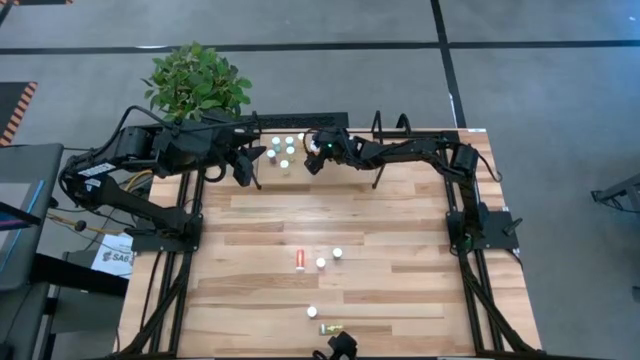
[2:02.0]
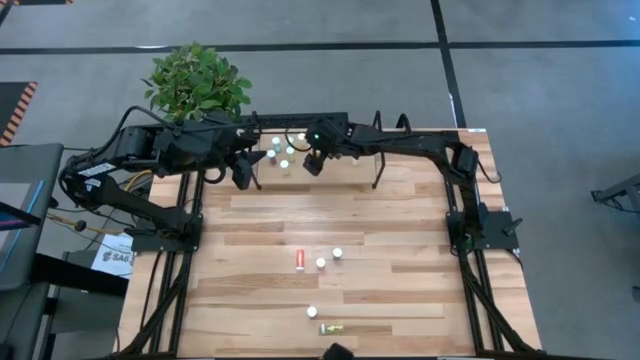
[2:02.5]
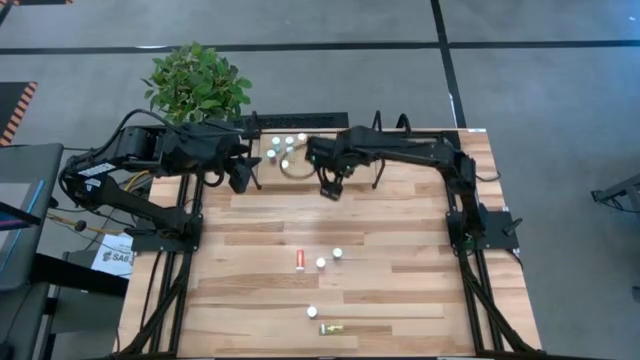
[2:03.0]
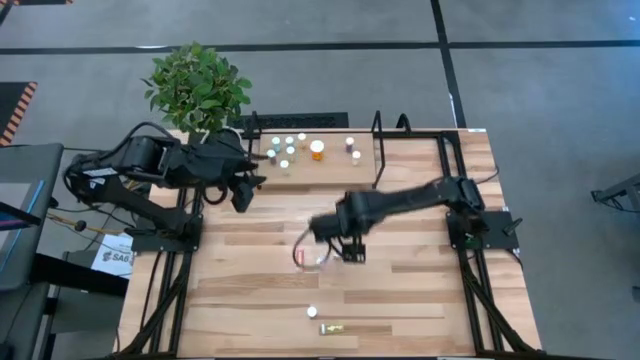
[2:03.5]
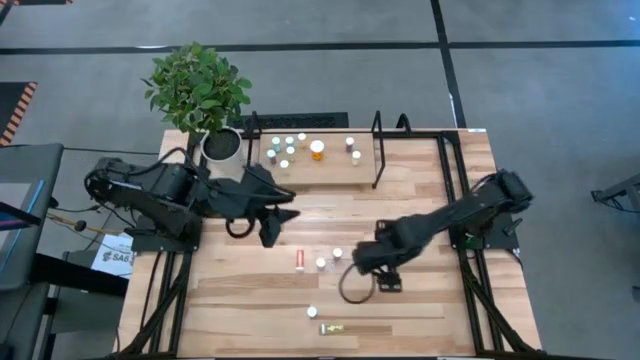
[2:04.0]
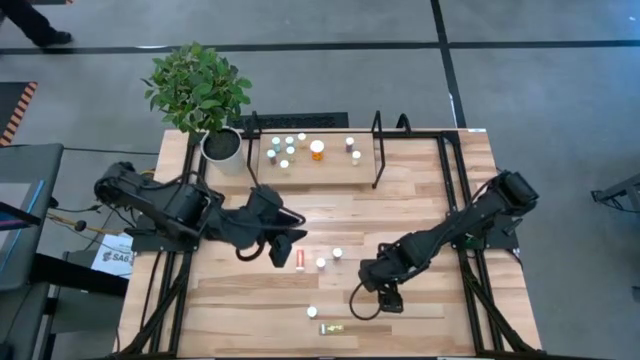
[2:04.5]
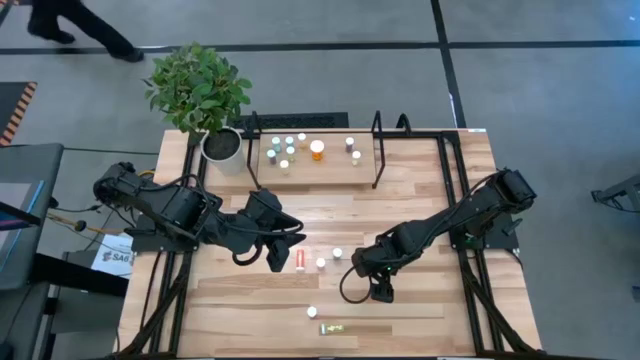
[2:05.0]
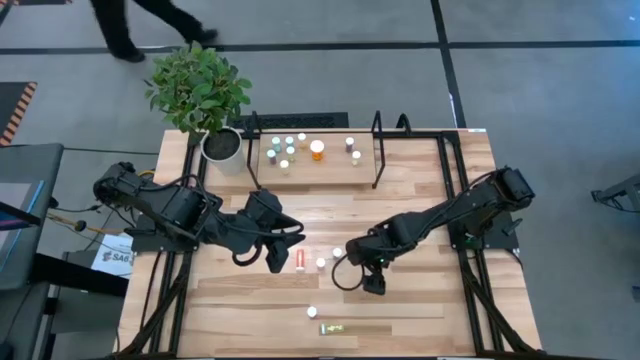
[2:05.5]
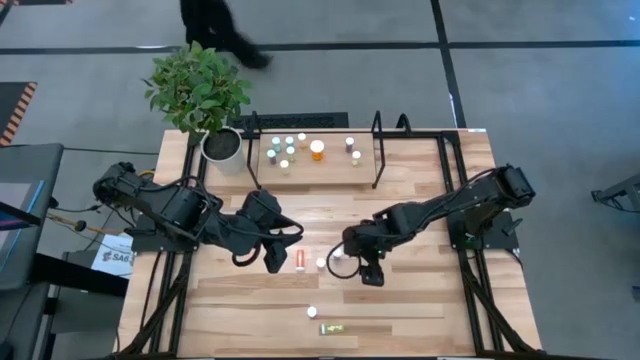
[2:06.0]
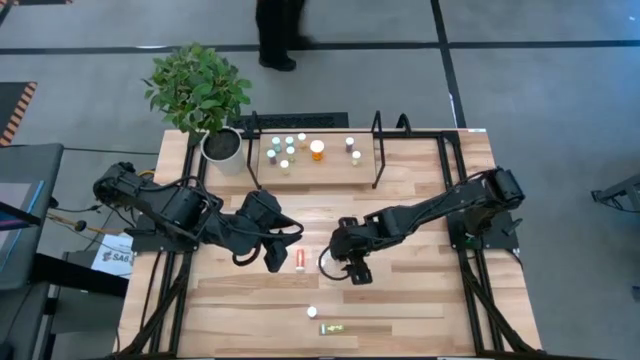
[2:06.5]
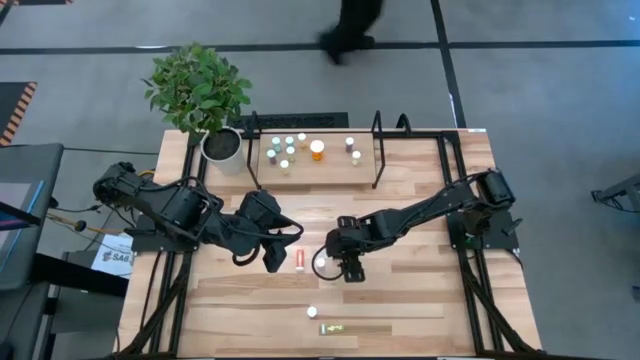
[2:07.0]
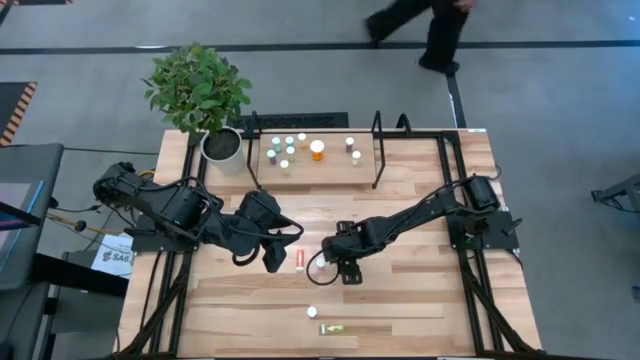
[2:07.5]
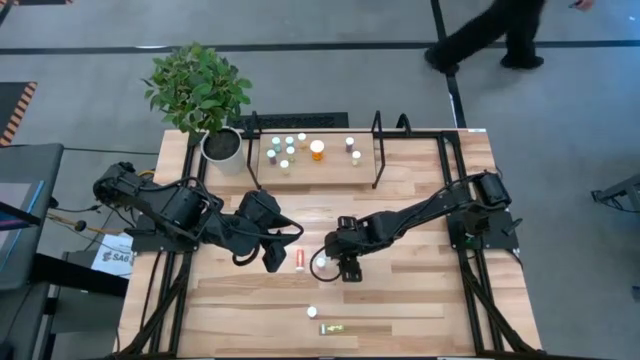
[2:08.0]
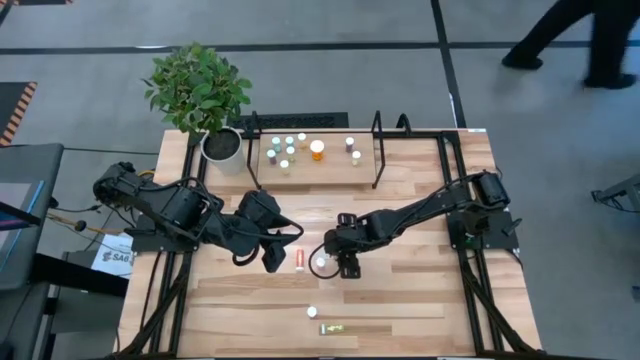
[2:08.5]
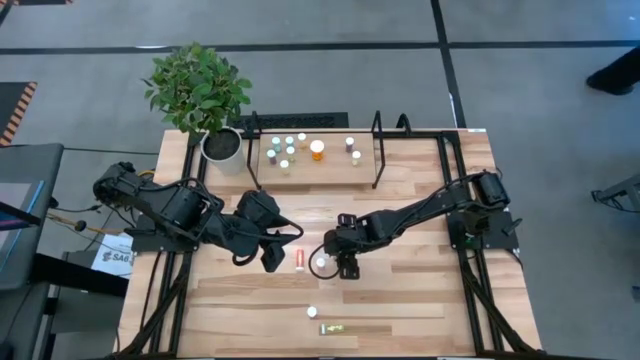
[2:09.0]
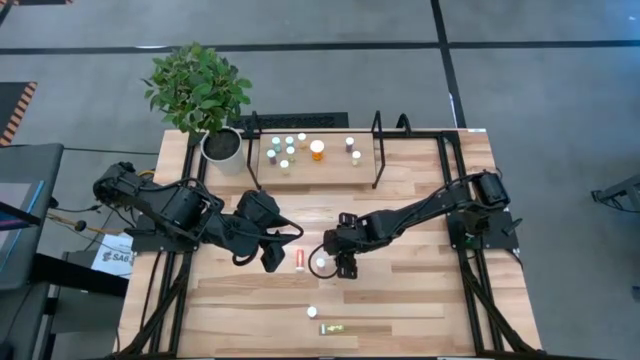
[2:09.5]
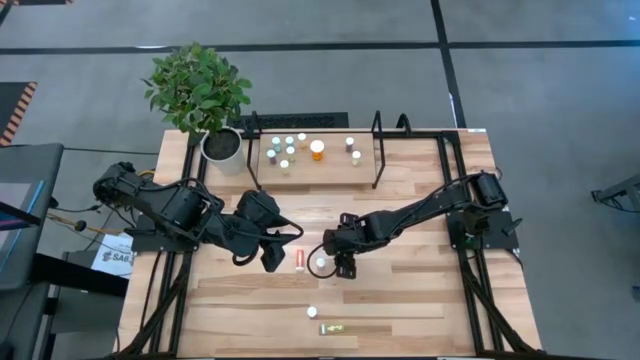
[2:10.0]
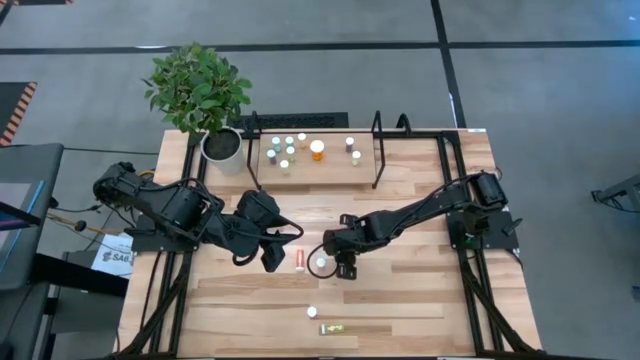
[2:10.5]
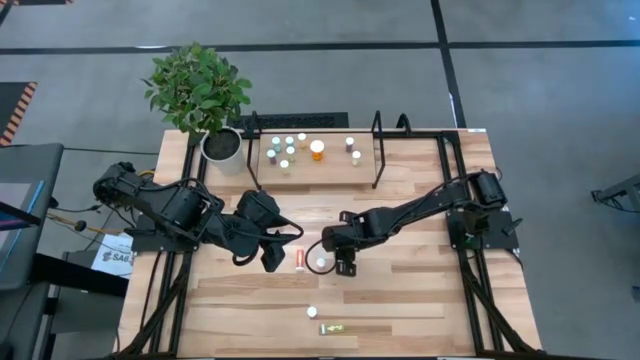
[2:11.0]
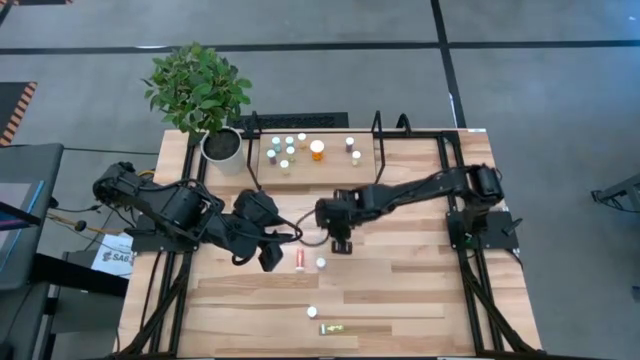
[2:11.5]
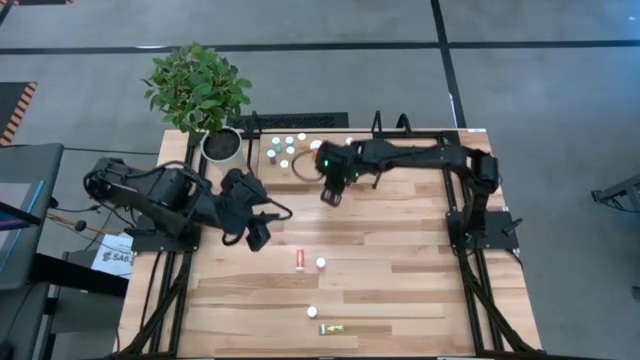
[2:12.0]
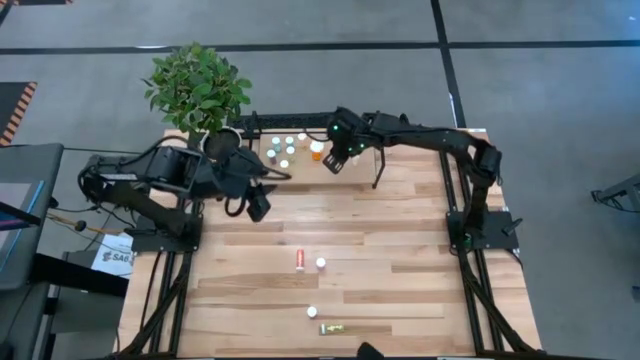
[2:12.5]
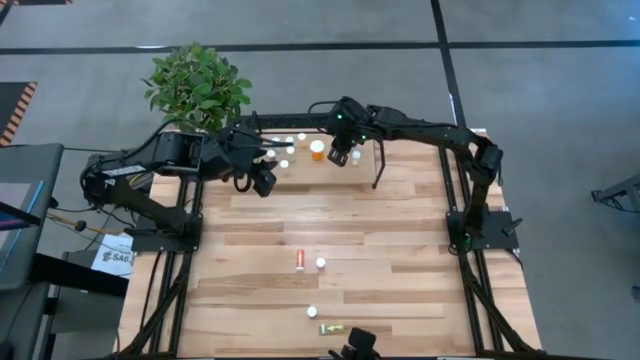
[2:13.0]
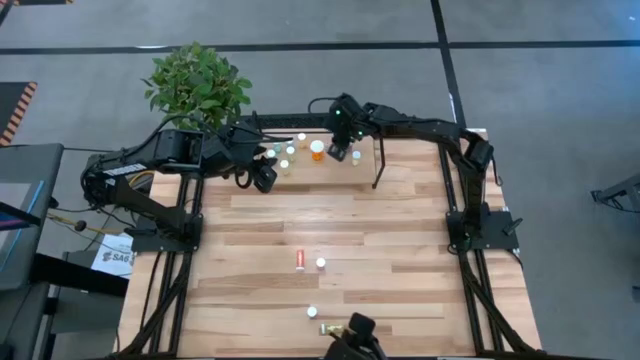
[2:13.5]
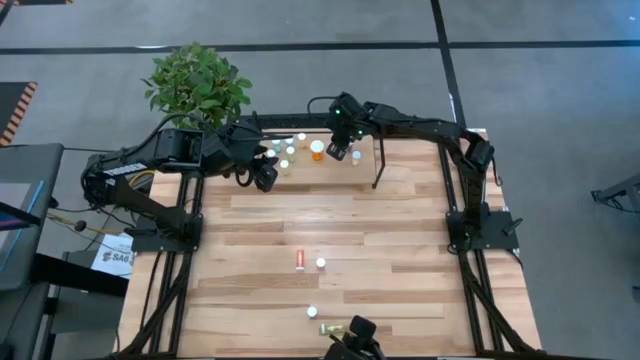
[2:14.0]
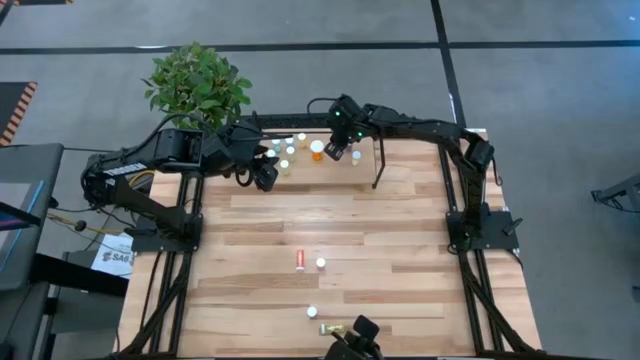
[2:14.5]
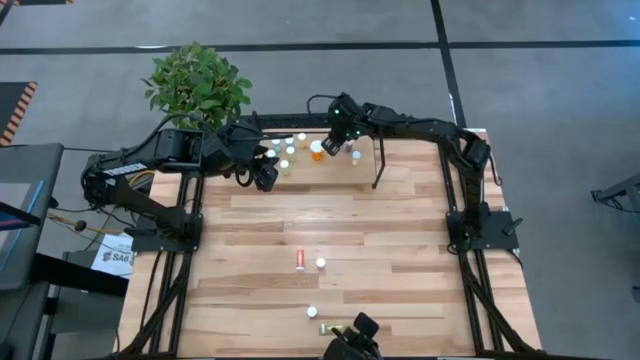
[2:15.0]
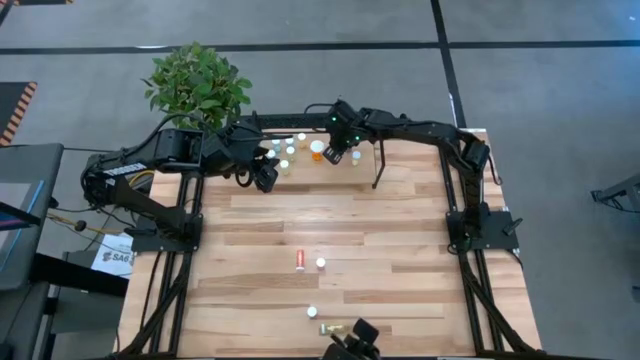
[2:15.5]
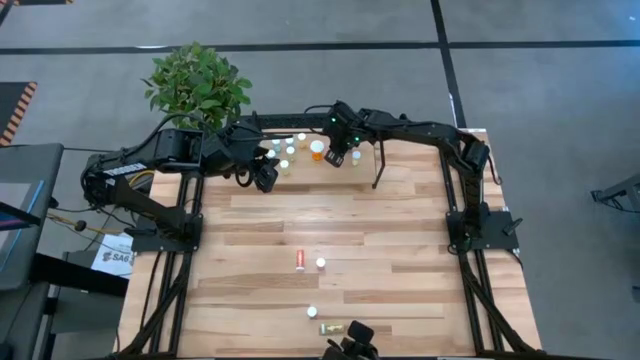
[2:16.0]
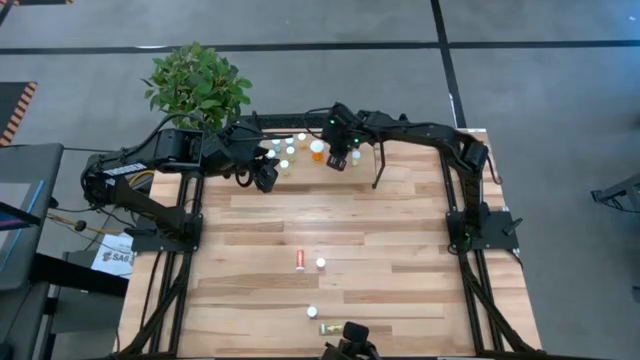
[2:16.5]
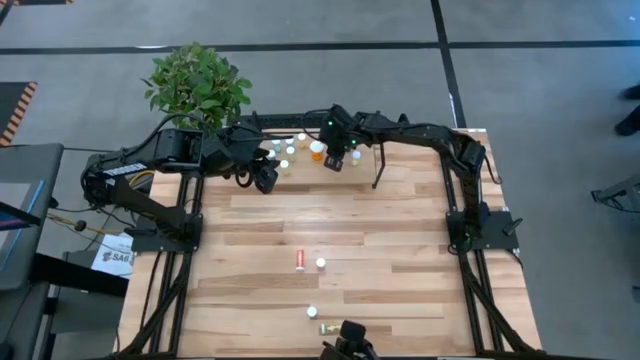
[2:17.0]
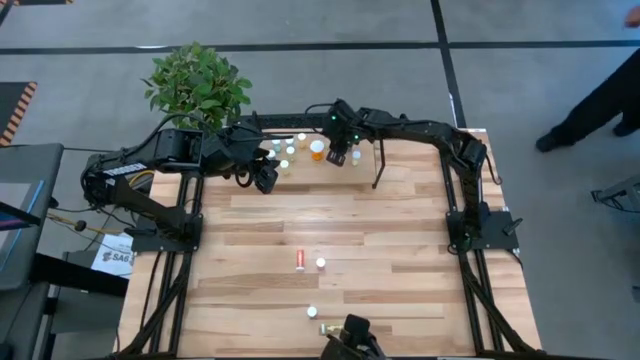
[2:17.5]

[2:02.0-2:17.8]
Task: Pick and place medicine bottles onto shelf by color
Put the pink pill bottle on the shelf

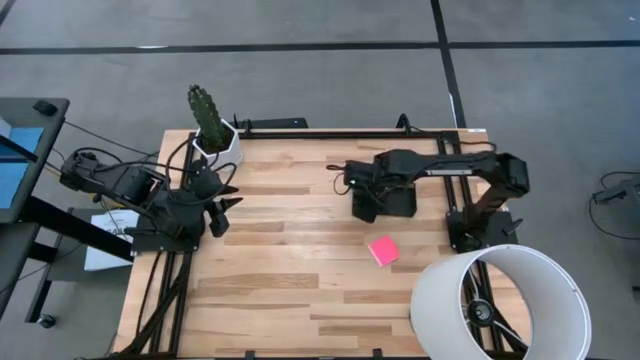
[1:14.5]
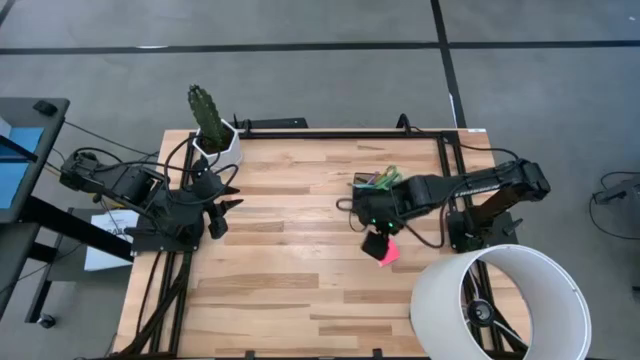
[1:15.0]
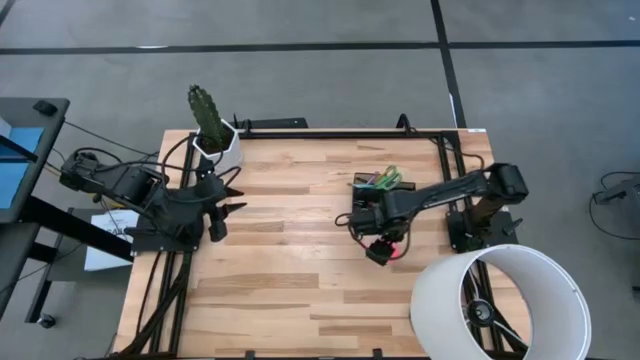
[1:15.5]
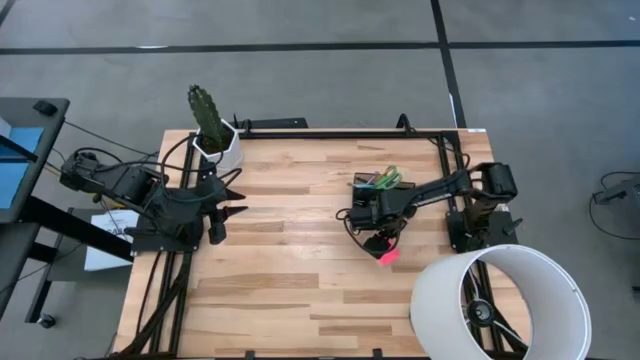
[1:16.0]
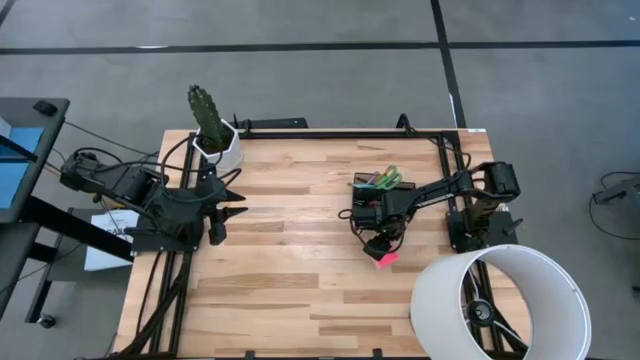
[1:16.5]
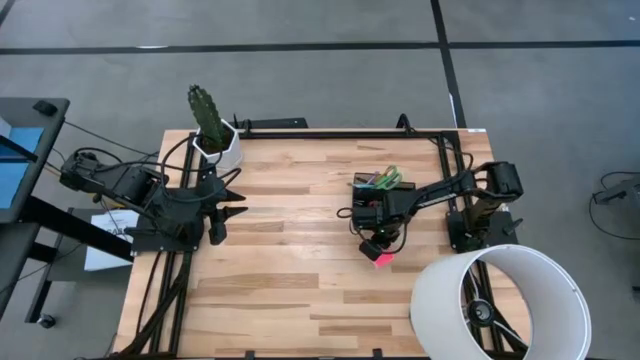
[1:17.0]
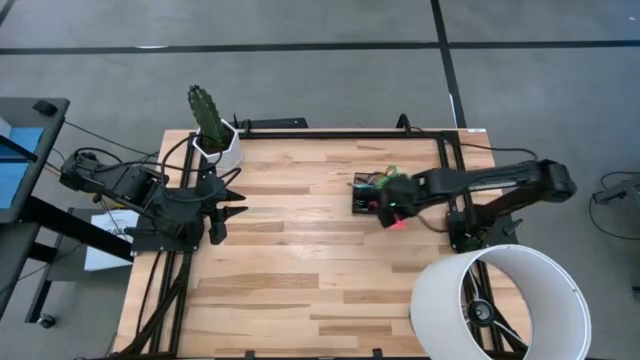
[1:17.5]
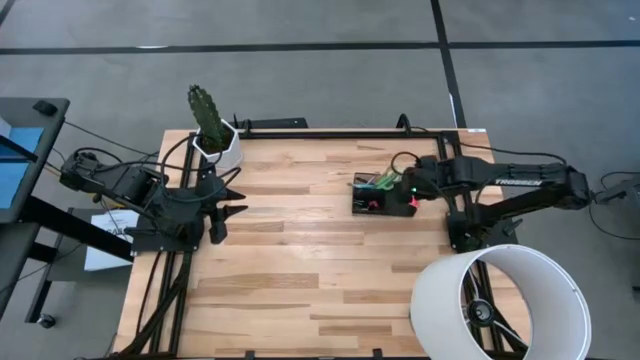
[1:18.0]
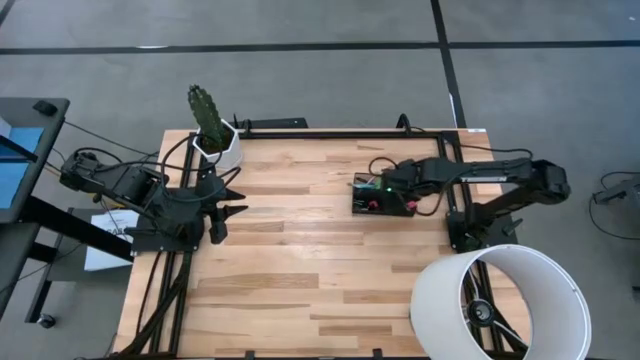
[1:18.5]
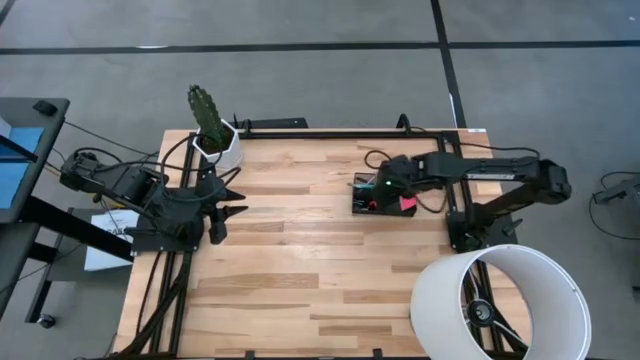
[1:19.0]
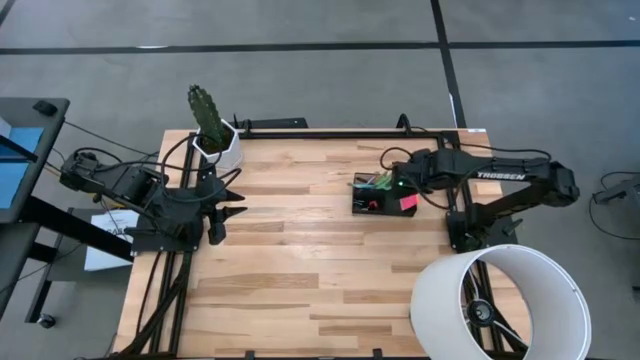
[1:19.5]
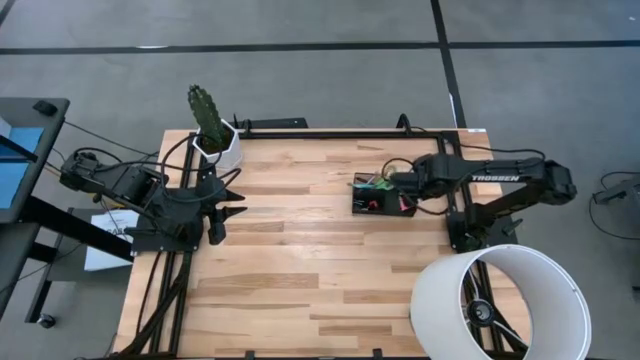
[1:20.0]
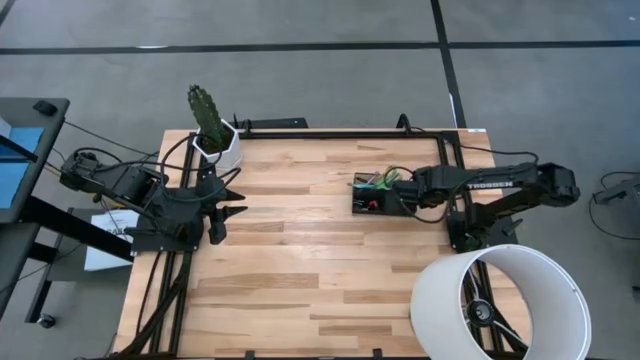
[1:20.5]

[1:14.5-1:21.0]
Task: Pick and place office supplies into organizer
Put the pink sticky note into the black desk organizer
